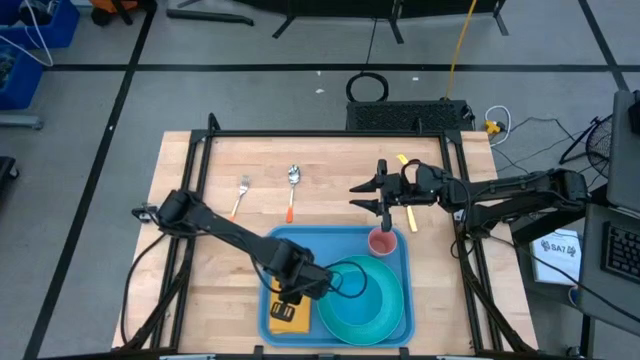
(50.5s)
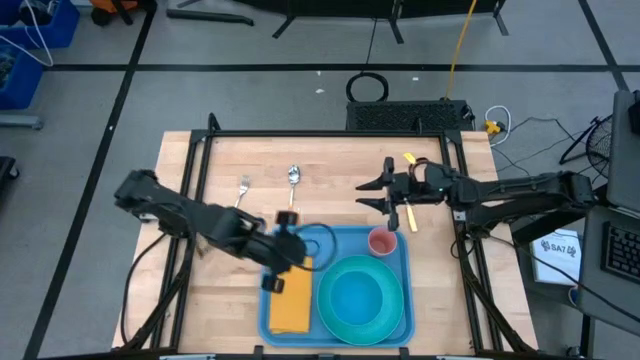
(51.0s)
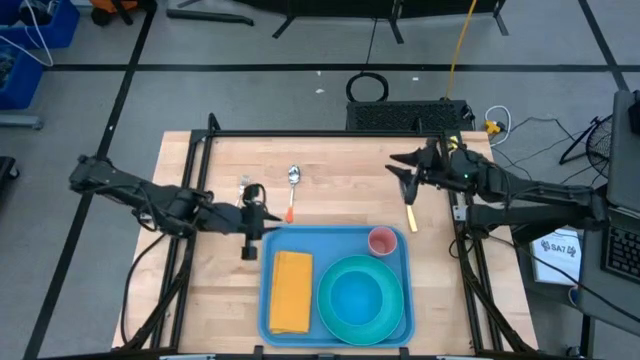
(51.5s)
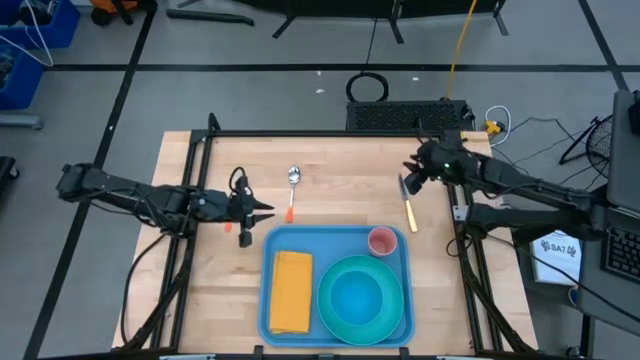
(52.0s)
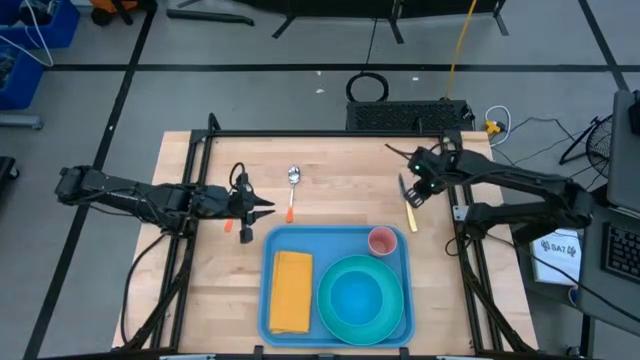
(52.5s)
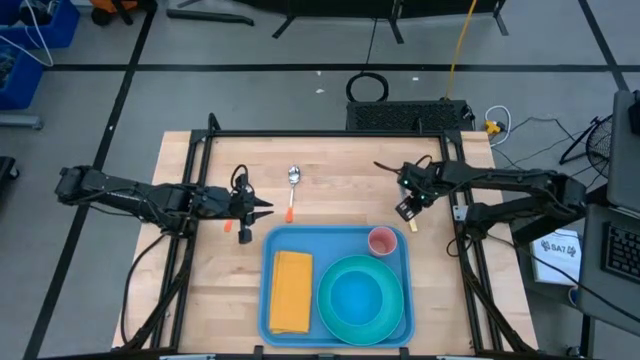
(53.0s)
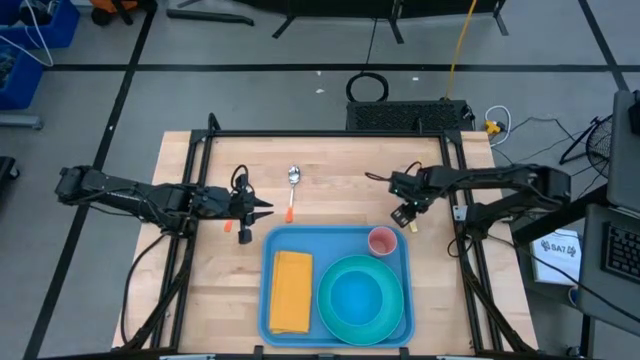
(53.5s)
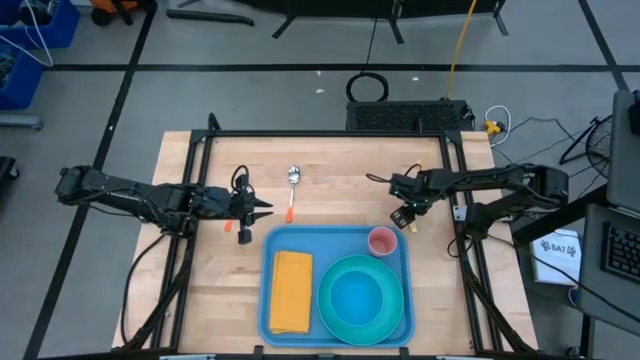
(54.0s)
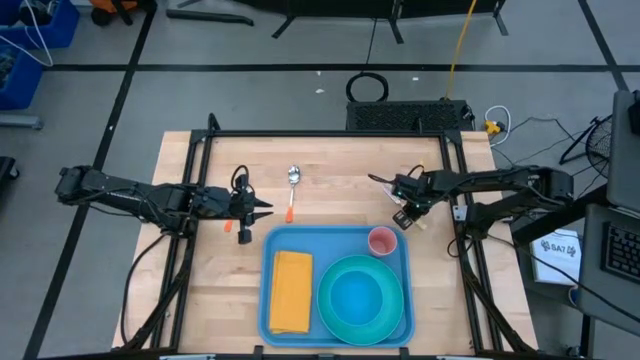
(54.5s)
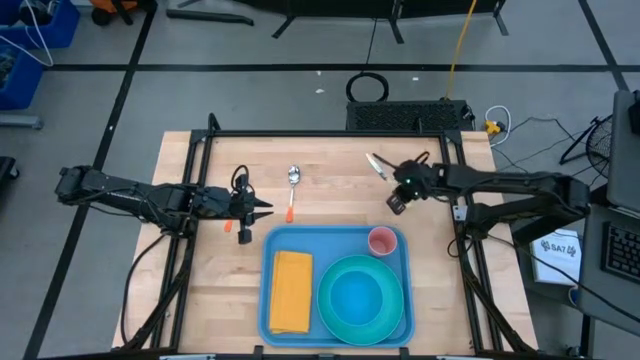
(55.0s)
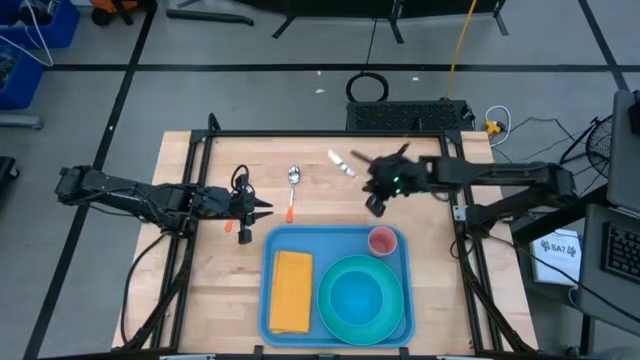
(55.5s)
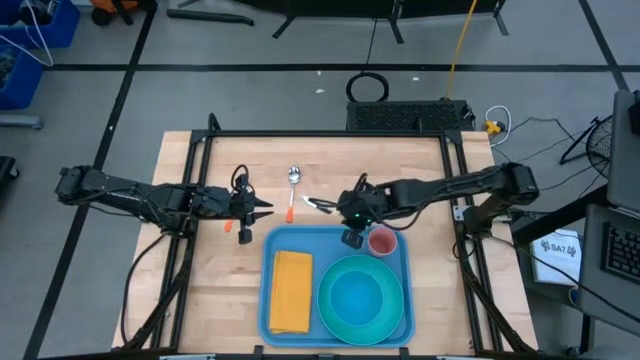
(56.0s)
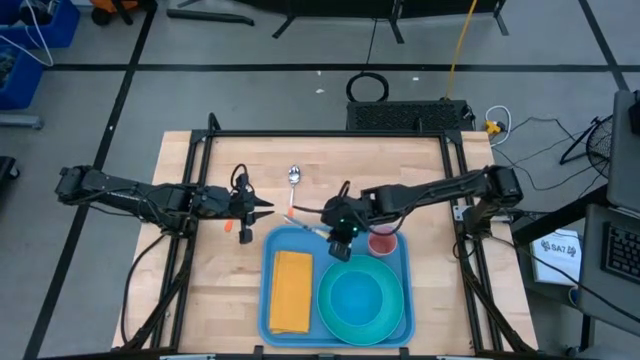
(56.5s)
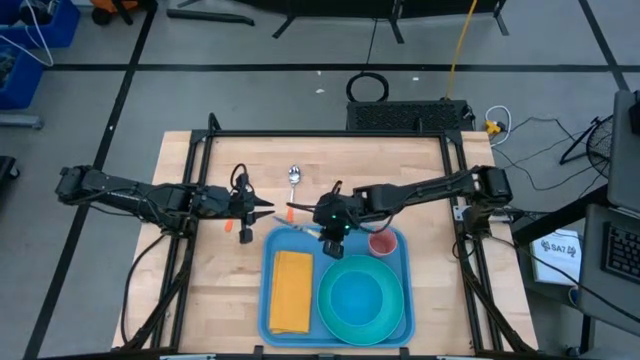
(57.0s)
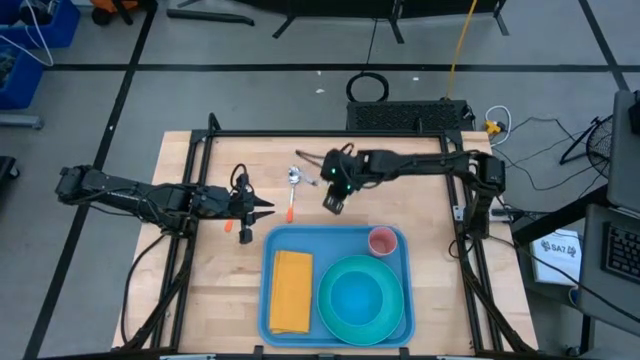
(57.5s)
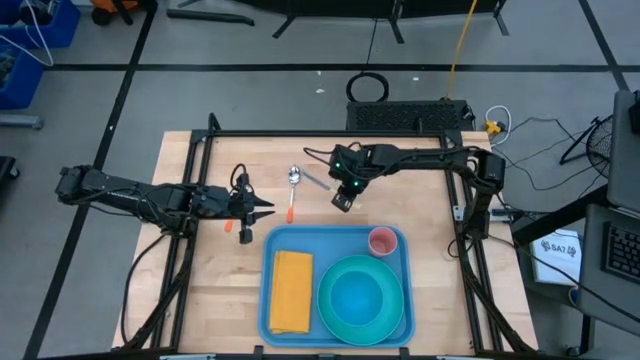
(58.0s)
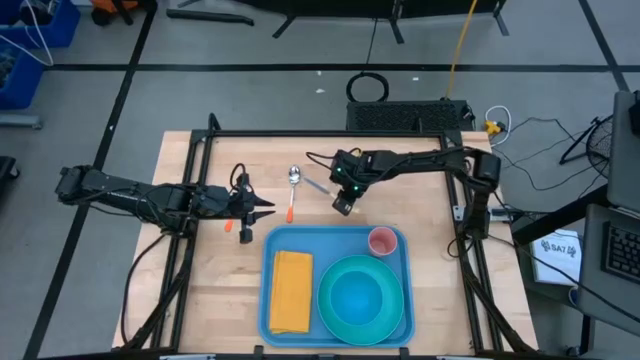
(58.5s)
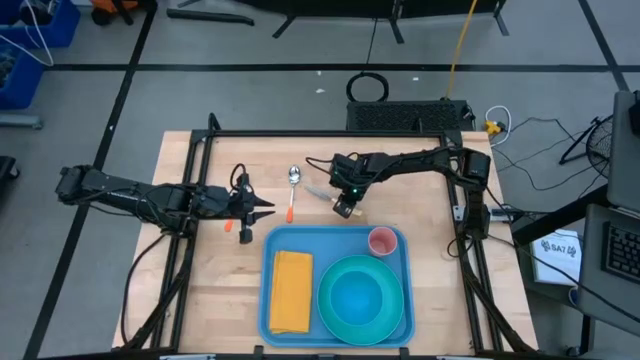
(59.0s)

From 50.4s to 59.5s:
Task: Set up tray
Move the yellow knife to the center of the table

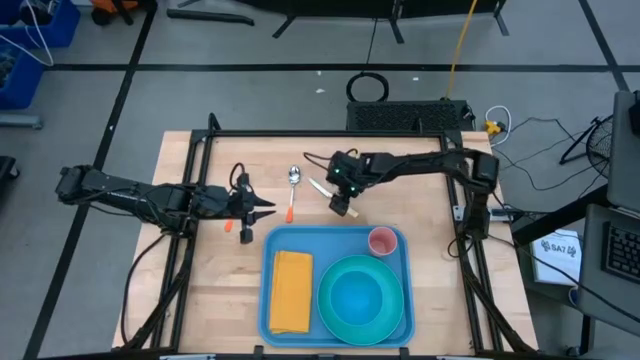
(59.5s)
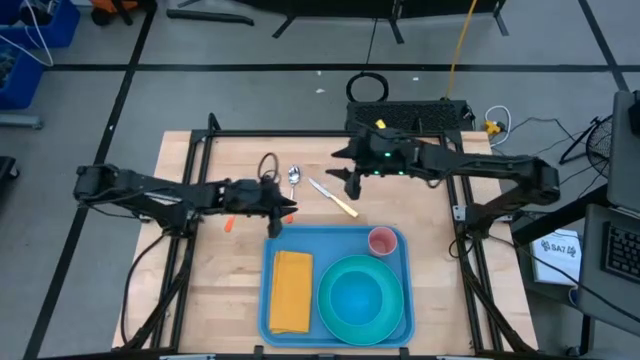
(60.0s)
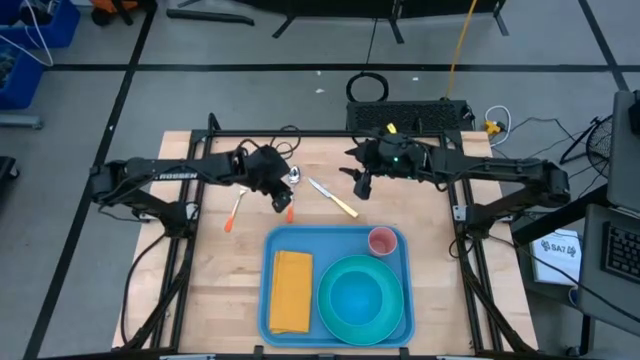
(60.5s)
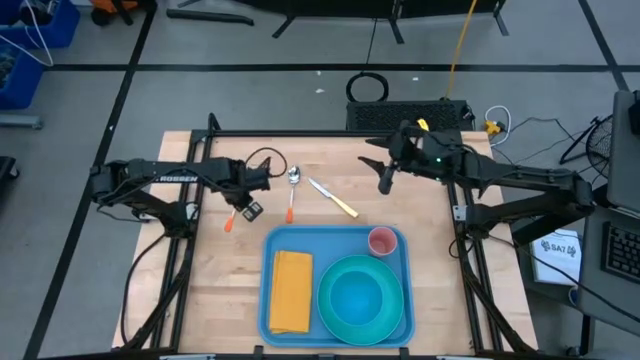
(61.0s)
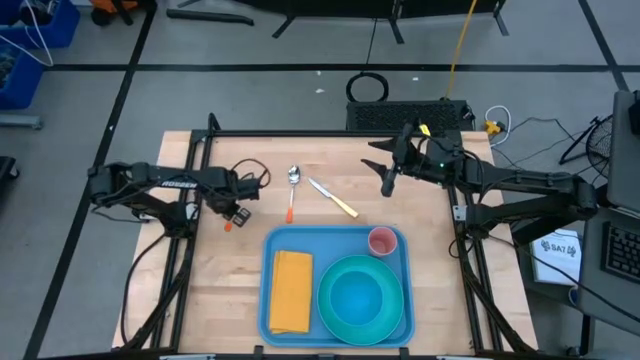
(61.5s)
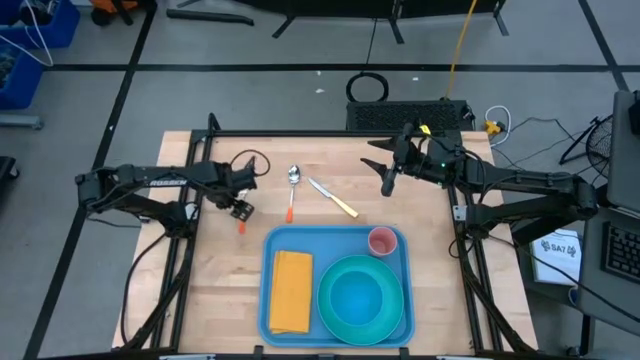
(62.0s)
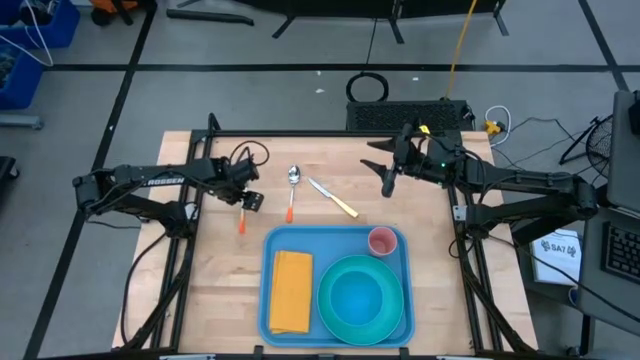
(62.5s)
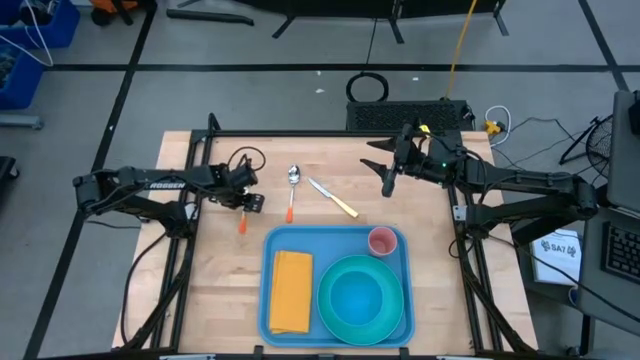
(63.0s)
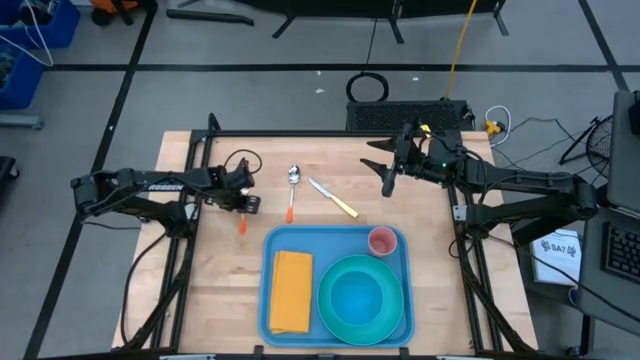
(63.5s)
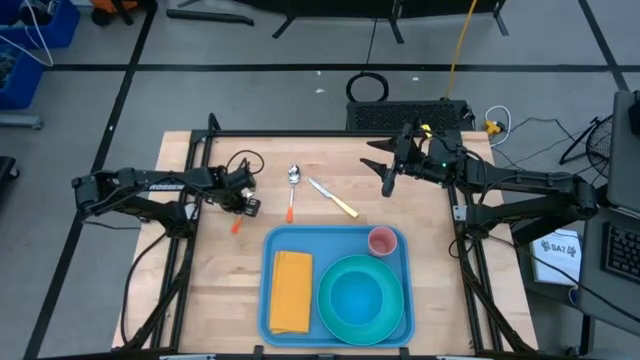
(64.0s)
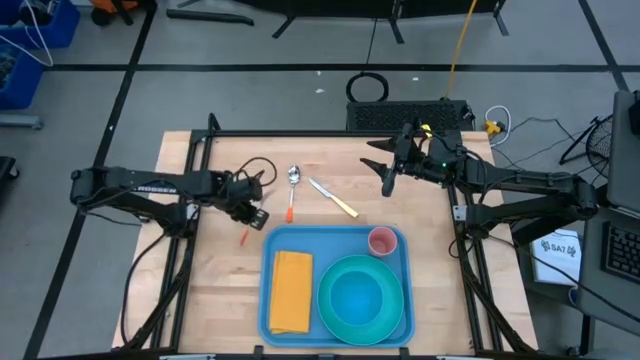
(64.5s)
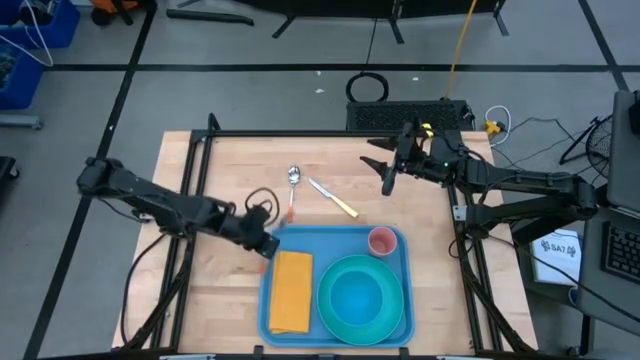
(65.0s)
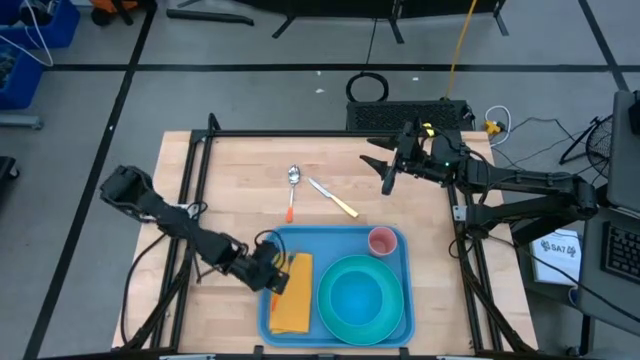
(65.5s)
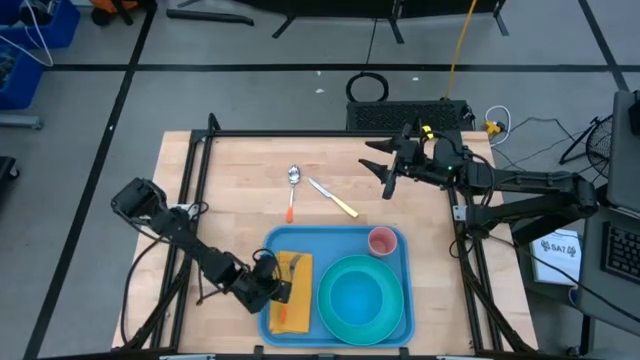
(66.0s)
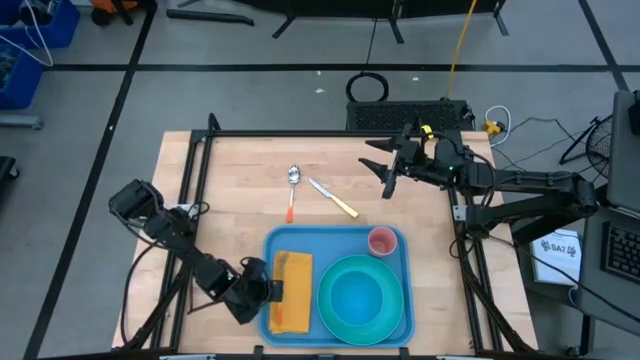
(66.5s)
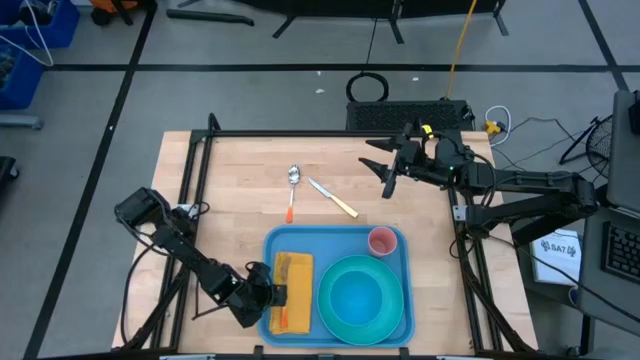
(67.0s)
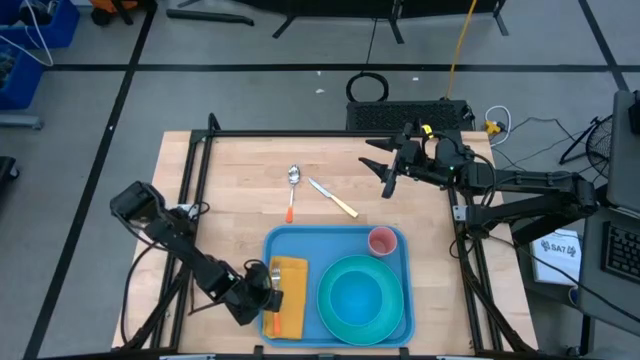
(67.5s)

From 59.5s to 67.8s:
Put the orange fork on top of the yellow table napkin

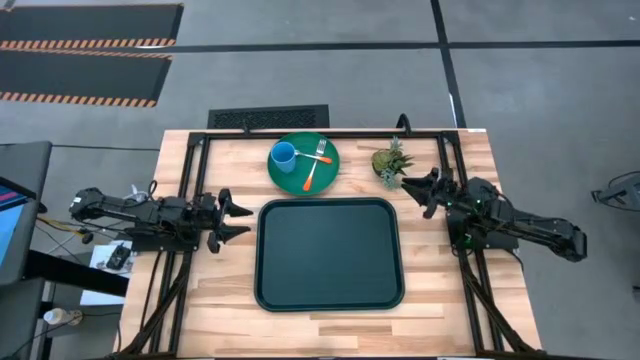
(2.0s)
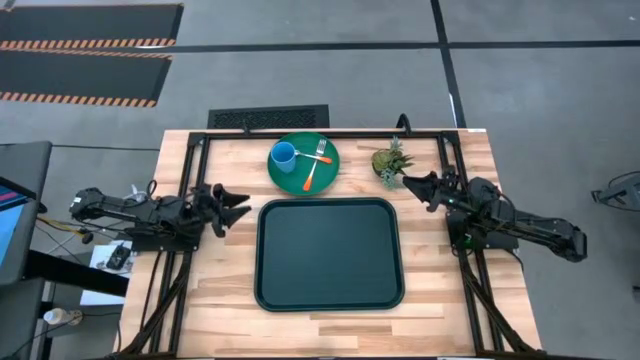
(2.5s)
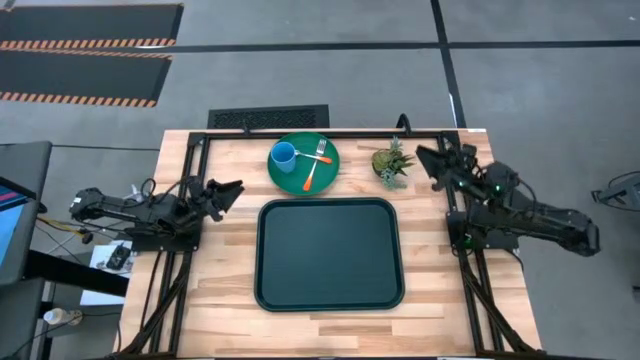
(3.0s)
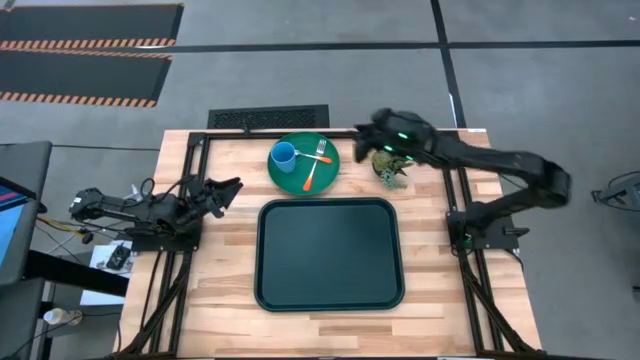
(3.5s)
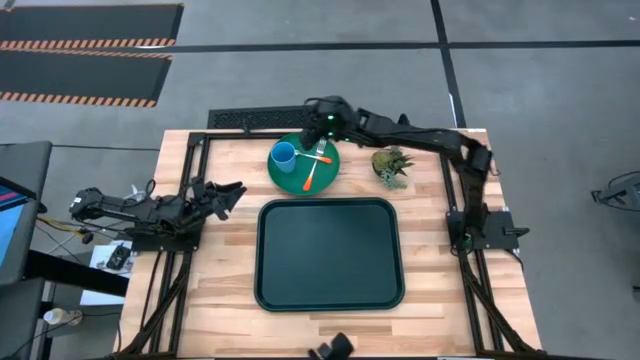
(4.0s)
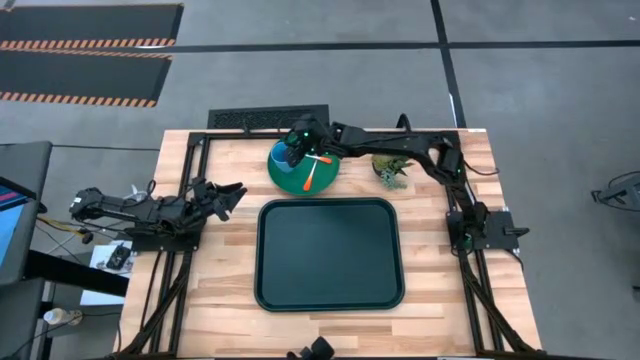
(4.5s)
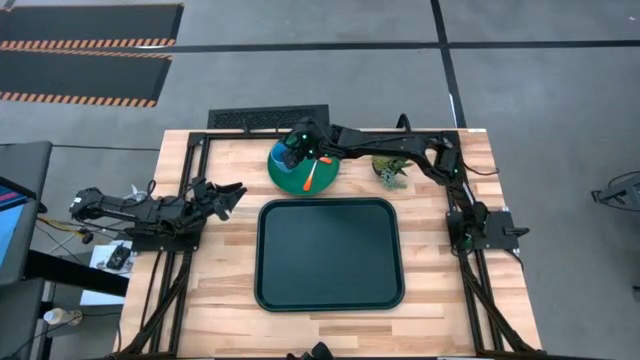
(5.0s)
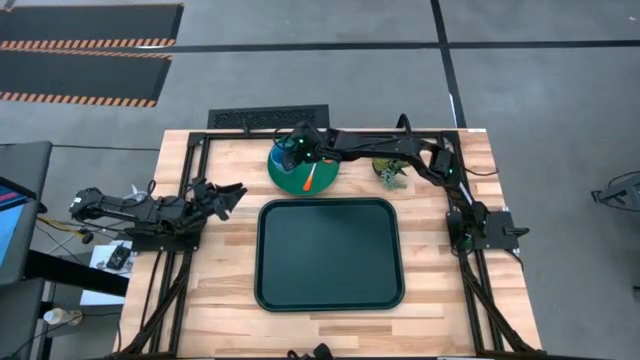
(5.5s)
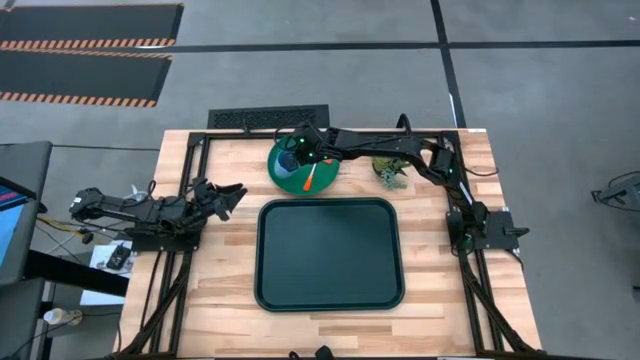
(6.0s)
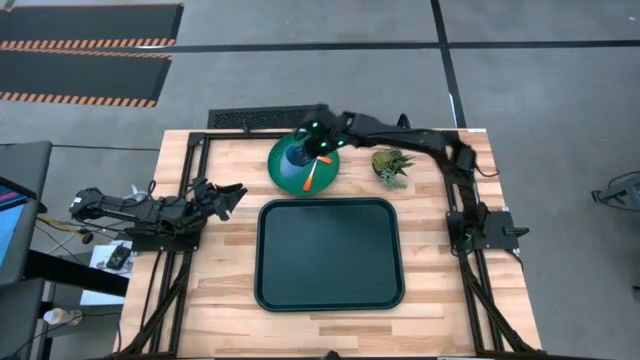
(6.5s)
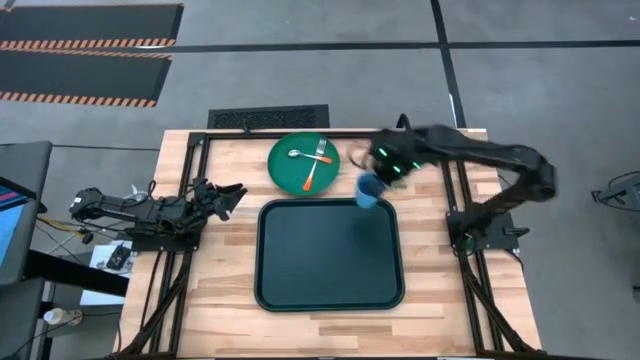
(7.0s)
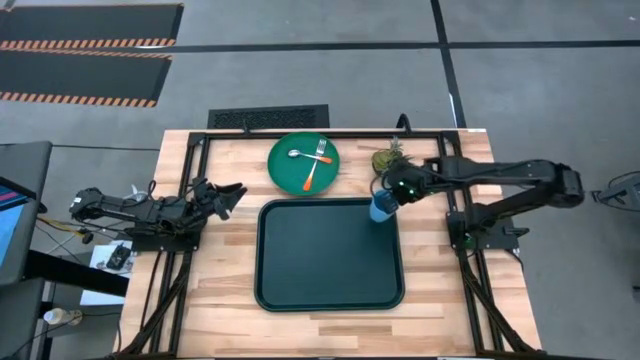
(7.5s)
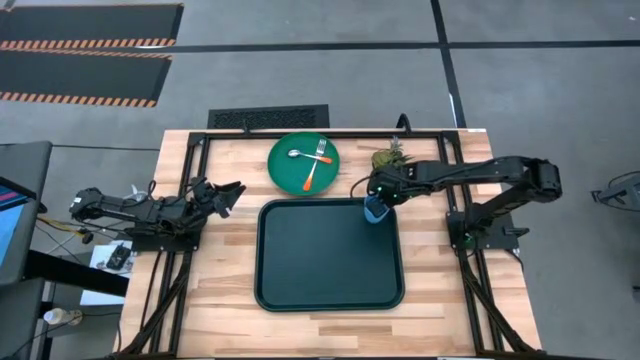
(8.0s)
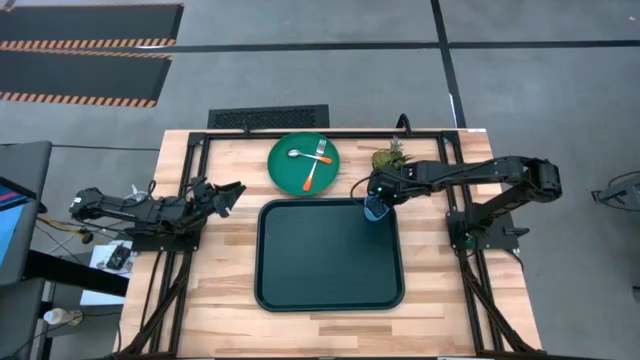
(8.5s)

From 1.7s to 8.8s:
Task: Pick and place plate/cup/fork/spoon on tray
Put the blue cup on the black table tray
